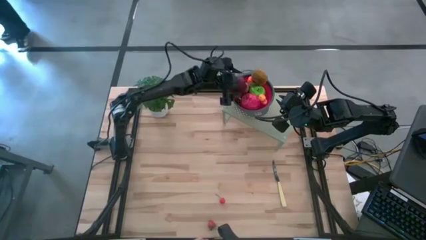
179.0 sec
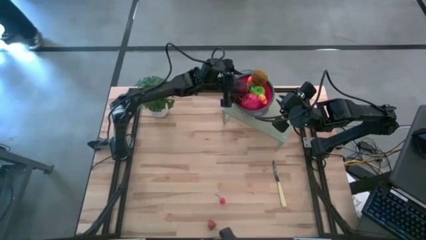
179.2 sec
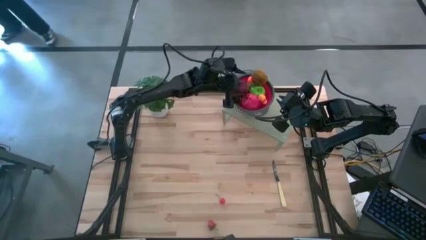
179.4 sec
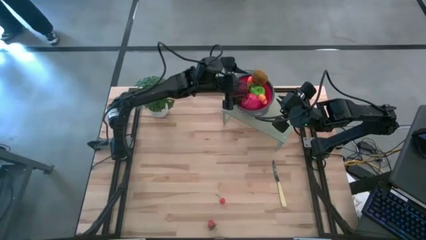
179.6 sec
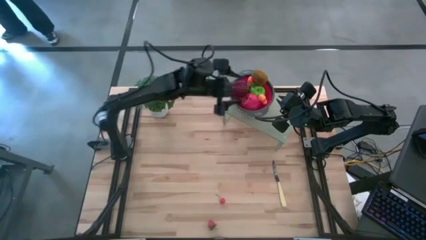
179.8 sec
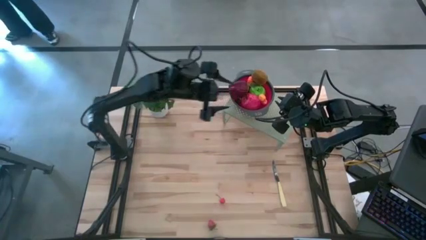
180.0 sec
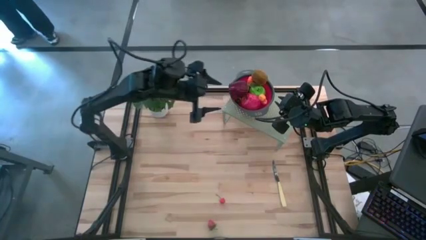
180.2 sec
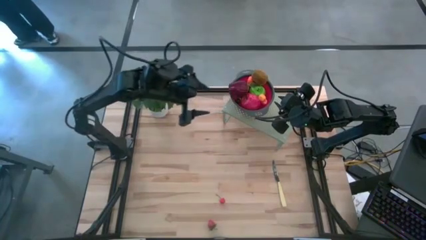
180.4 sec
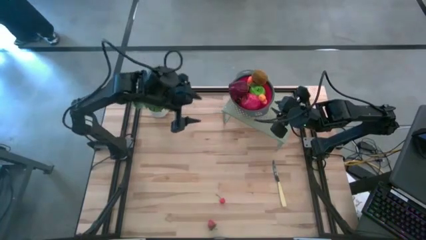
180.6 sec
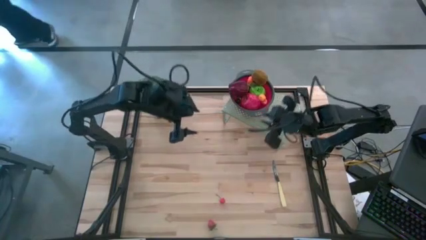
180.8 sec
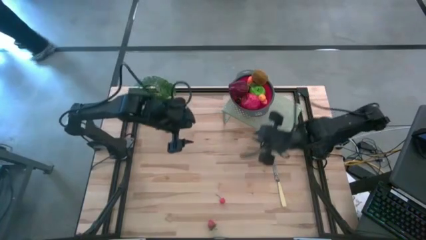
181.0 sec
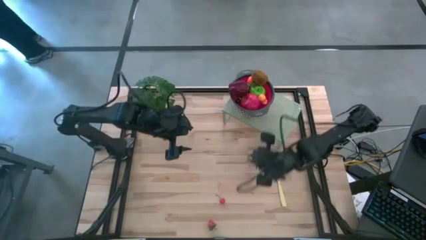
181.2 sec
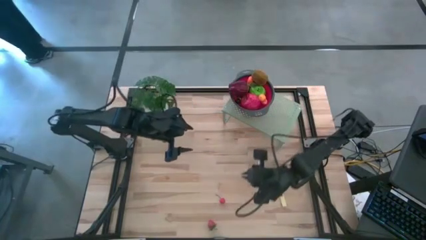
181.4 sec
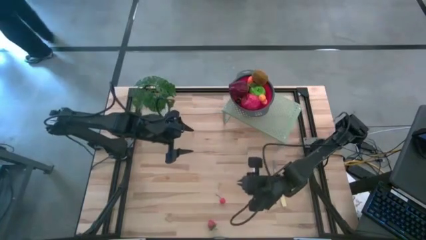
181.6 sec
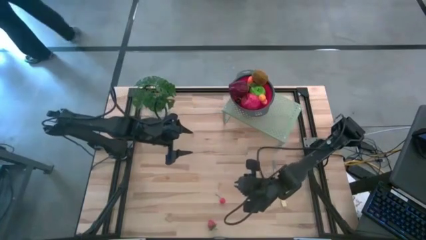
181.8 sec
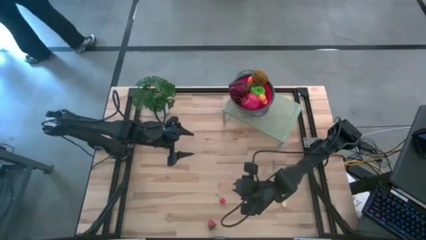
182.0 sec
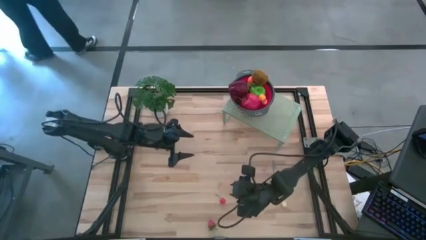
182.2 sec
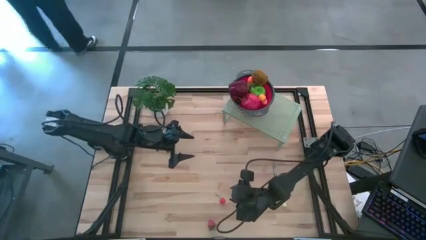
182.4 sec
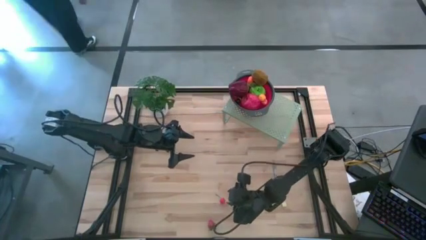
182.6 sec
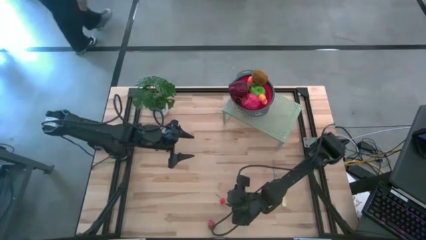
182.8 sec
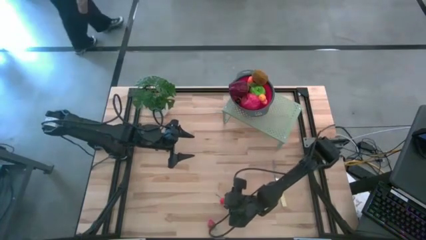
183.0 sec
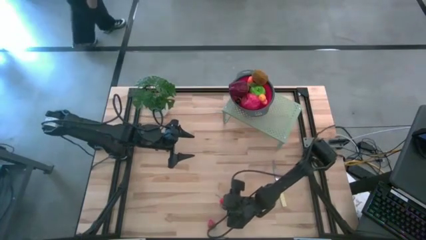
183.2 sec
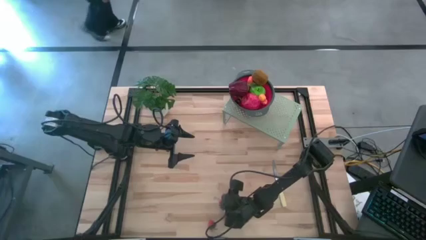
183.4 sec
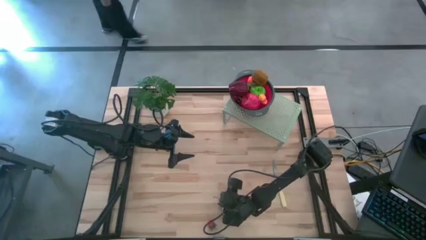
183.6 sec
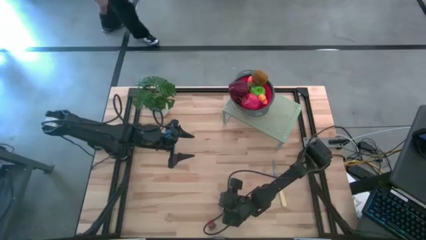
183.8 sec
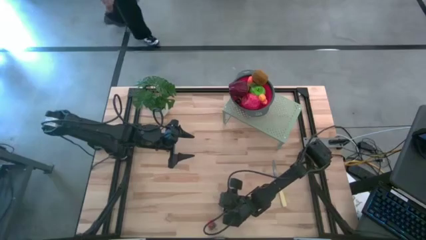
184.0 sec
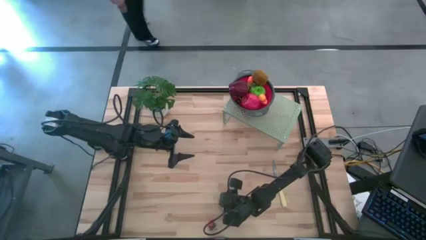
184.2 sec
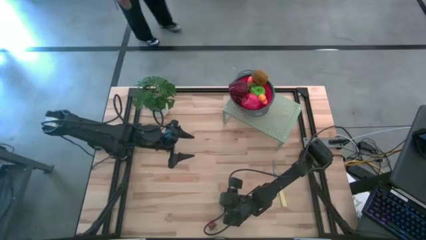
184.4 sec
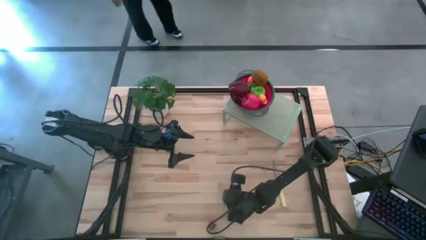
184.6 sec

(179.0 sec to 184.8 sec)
Task: Pick & Place Fruit
Put the red cherry into the red strainer bowl

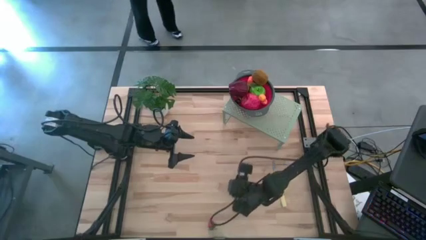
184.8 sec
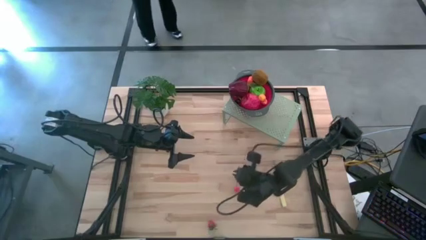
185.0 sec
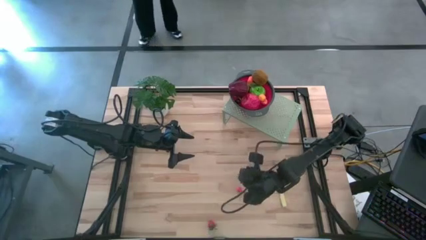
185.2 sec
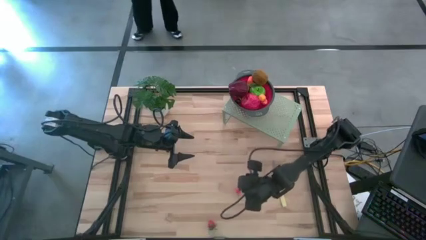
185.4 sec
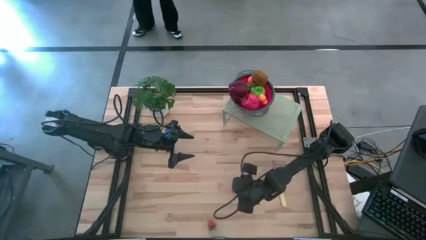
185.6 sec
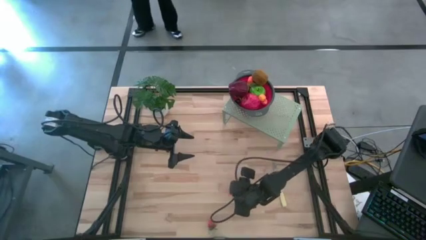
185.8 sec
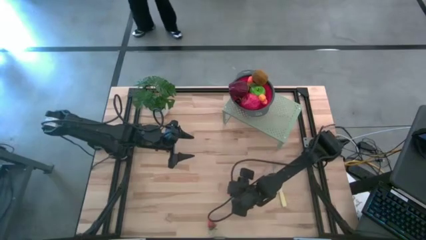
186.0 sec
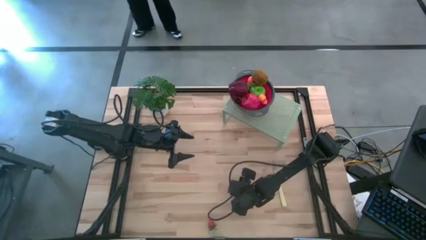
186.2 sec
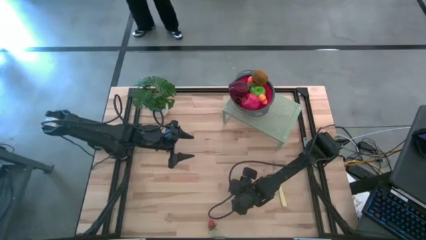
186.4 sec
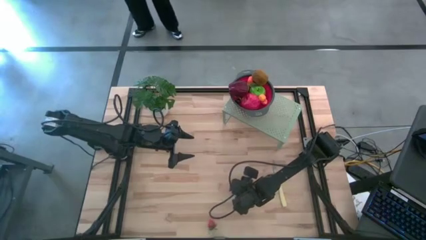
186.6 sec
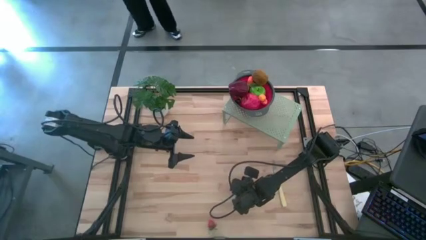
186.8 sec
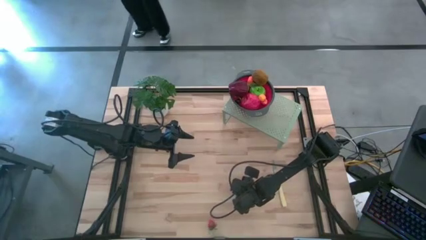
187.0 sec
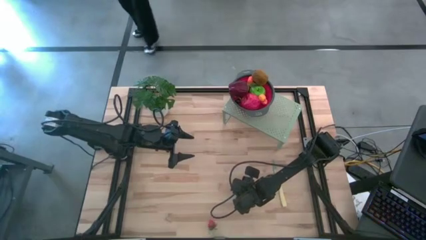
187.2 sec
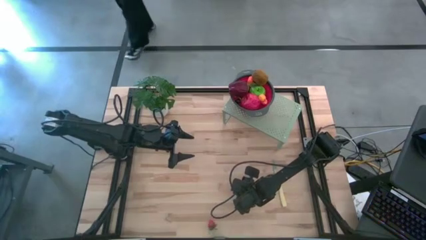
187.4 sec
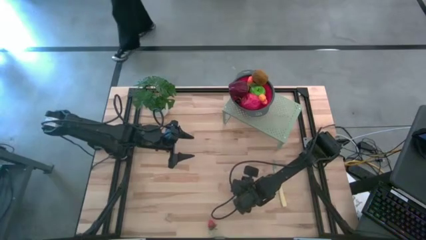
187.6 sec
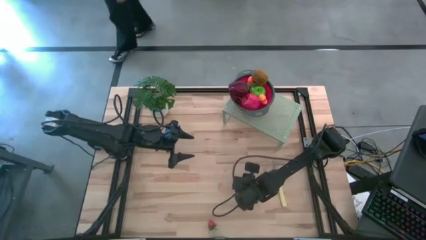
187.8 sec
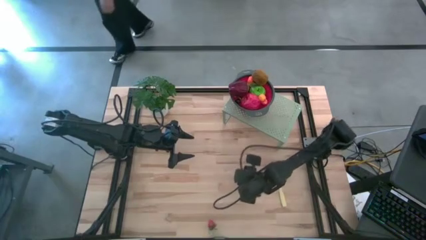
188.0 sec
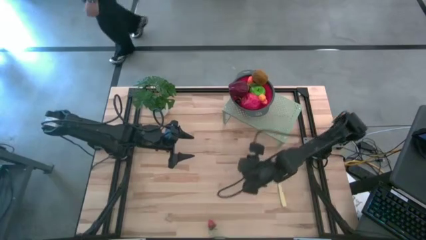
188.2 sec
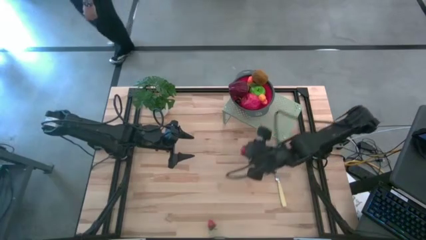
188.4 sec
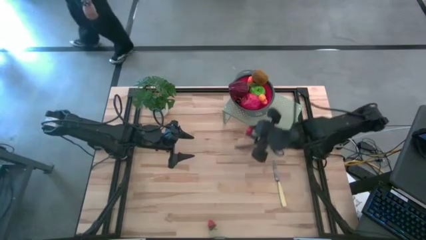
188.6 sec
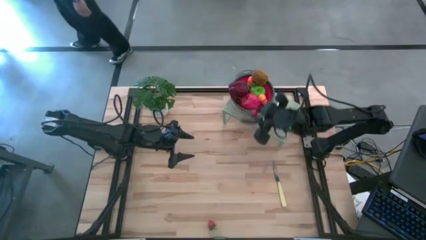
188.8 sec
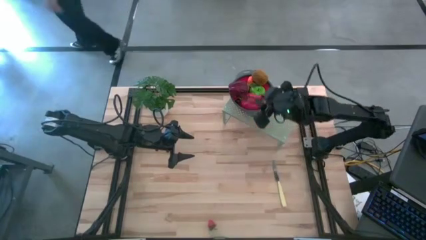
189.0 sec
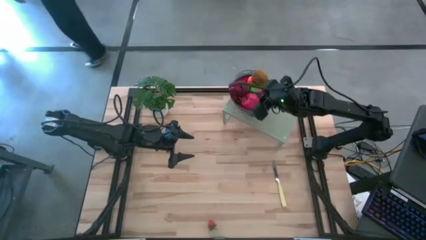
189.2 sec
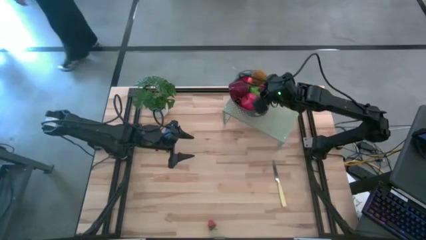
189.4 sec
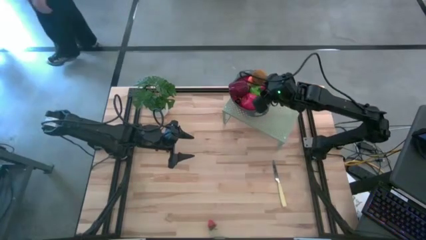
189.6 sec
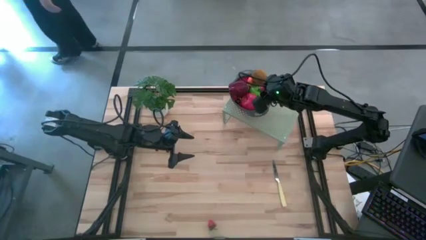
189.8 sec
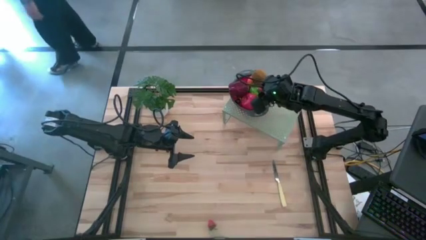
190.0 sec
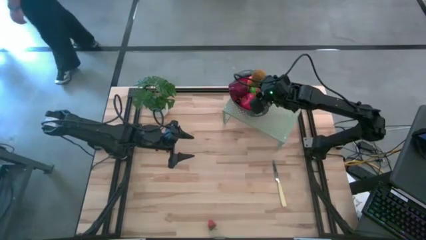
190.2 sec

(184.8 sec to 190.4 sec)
Put the red cherry into the red strainer bowl

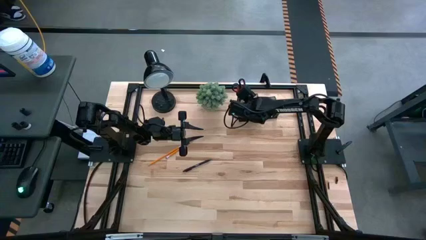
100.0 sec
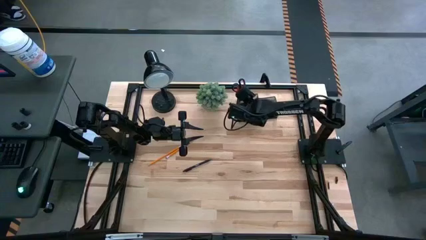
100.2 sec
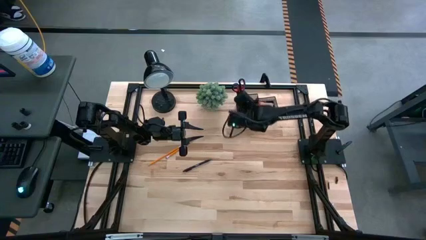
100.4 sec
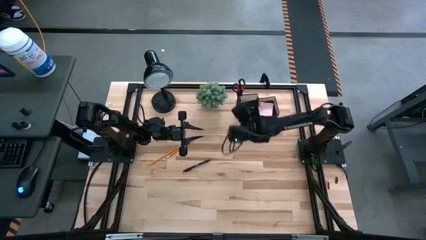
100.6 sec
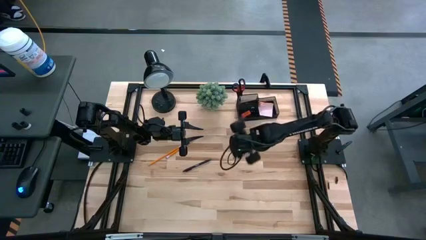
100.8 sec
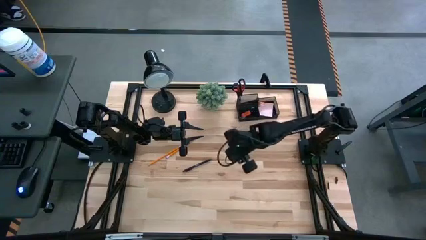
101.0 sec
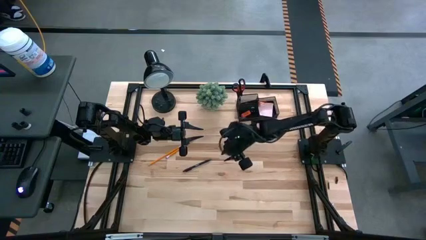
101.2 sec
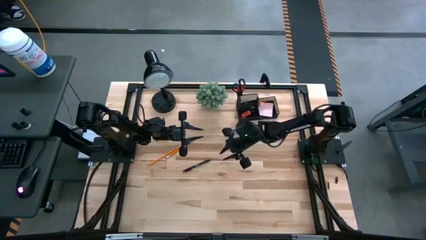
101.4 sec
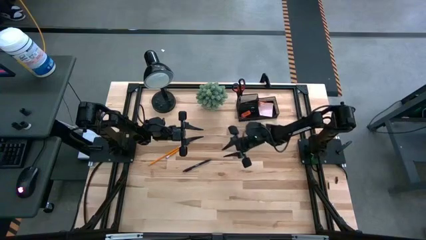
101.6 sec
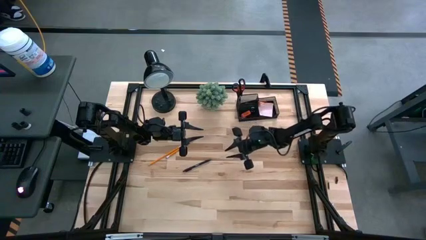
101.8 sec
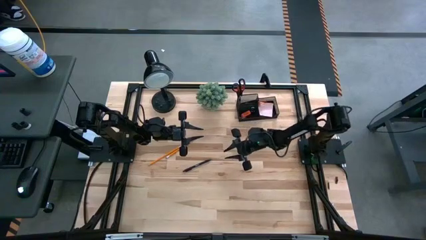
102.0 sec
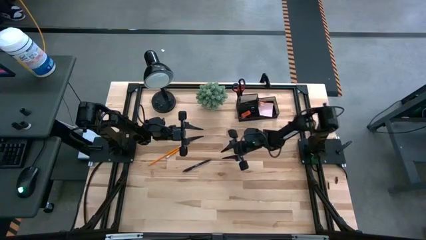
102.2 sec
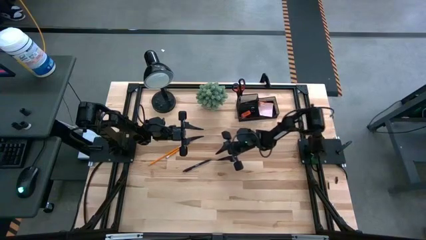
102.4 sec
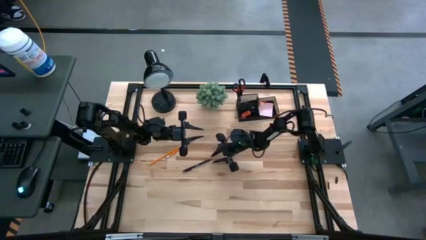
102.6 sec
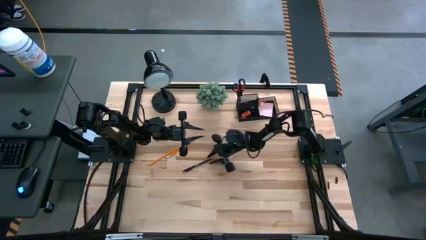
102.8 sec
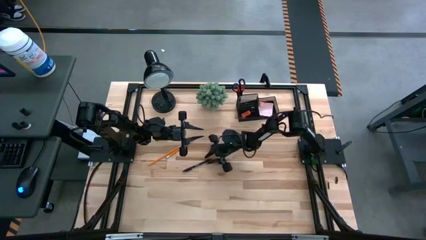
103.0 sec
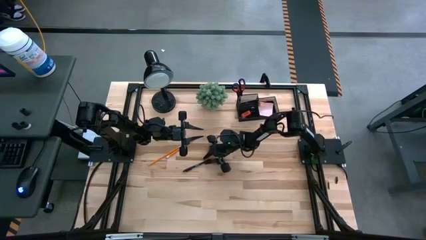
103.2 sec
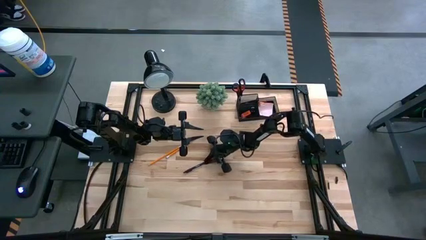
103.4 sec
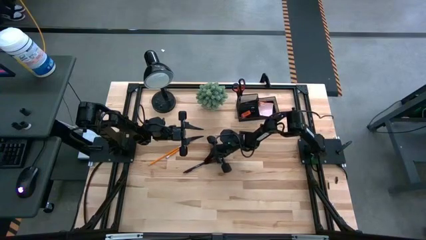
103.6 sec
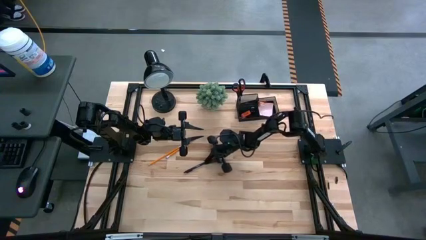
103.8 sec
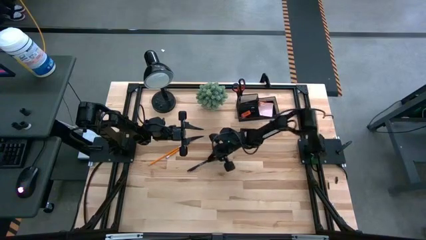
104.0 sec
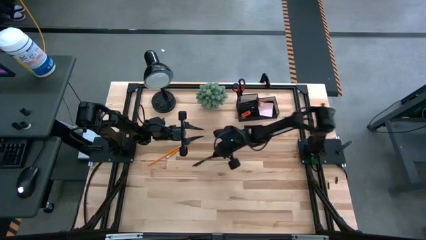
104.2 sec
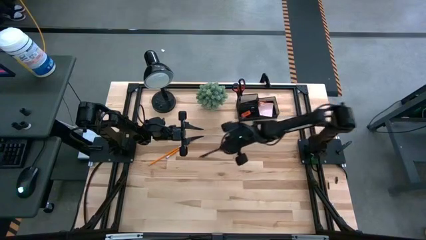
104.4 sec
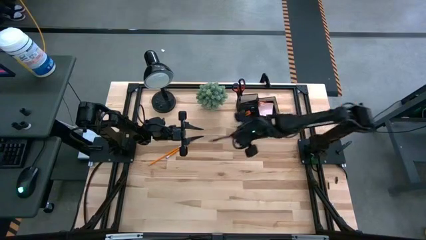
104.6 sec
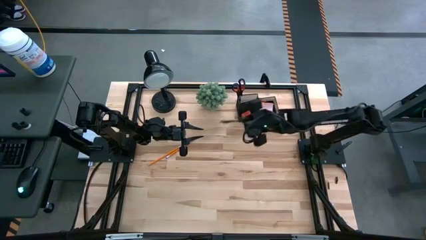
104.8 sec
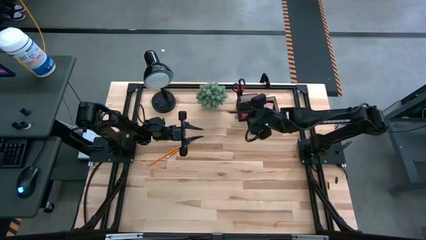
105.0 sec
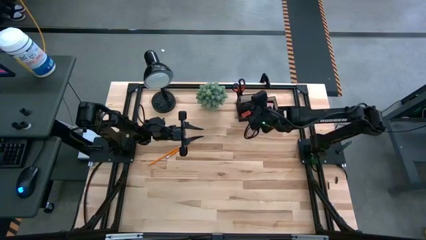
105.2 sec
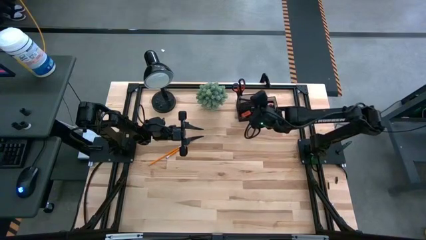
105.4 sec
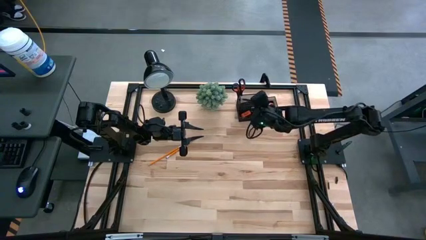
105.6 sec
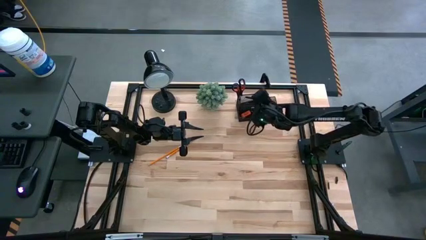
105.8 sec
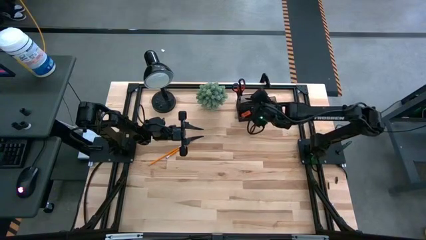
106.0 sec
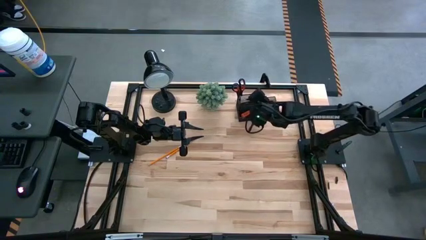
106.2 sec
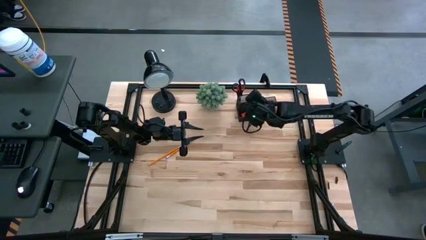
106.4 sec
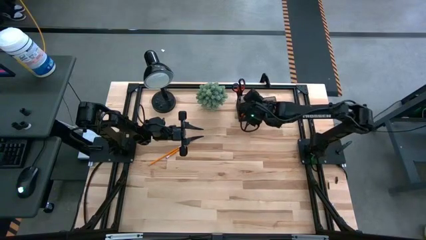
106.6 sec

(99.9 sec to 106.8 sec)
Task: Pick and place office supplies into organizer
Put the black pen into the black desk organizer
